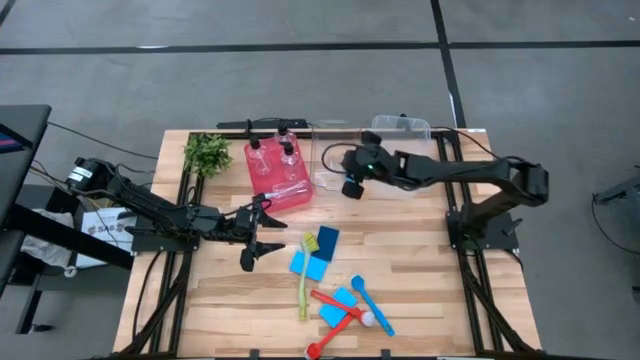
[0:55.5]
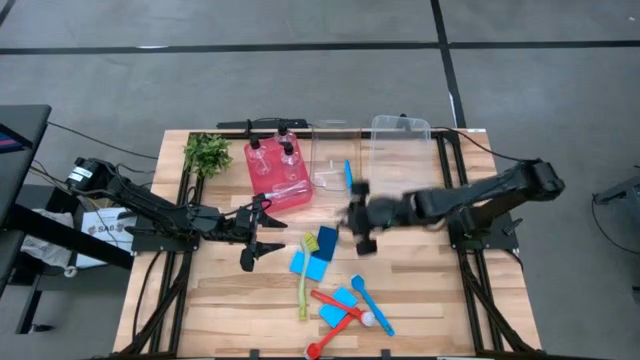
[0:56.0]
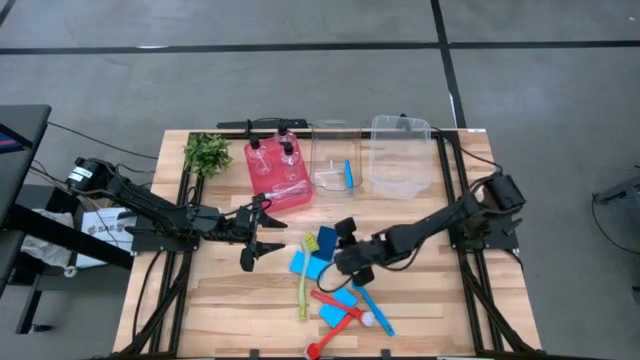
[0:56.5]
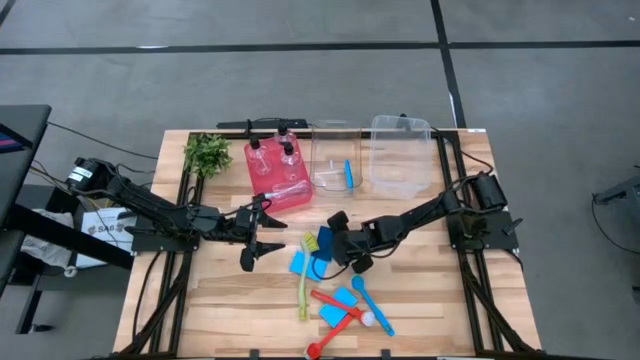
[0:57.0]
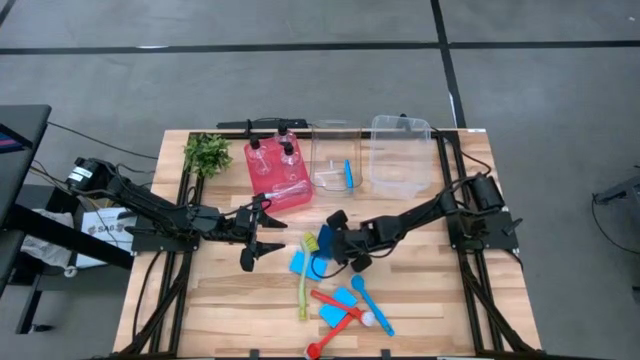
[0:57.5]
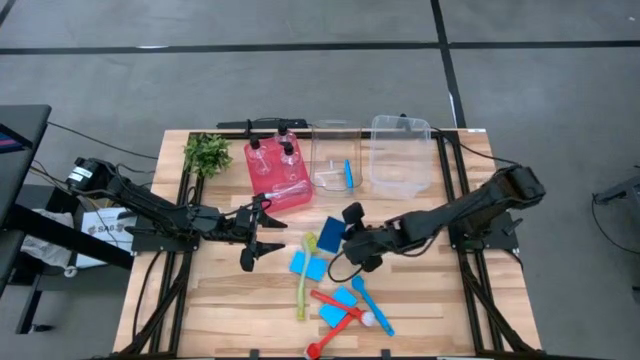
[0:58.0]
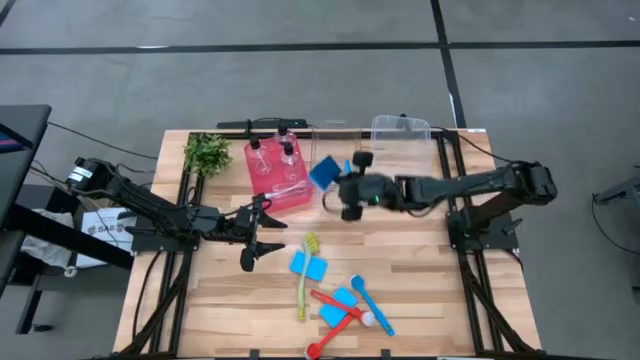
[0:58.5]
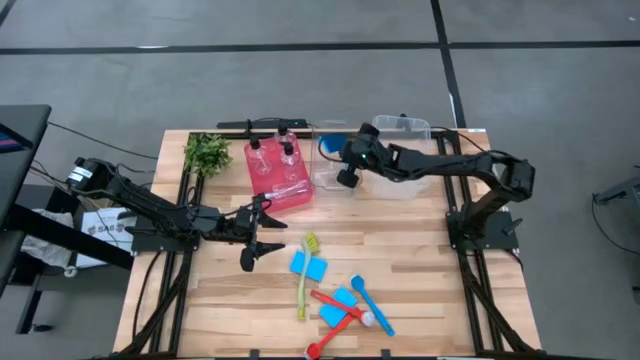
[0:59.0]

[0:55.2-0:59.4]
Task: Pick & Place Kitchen Sink Supplies
Put the blue sponge into the left transparent bin

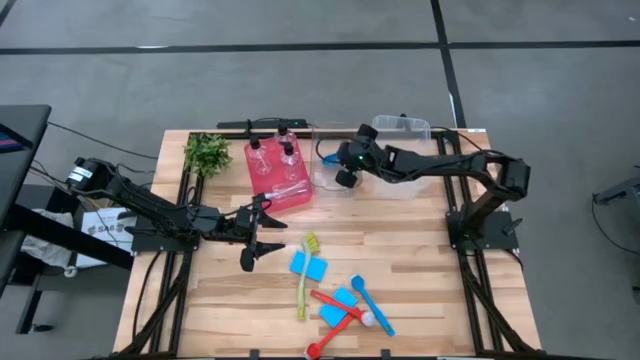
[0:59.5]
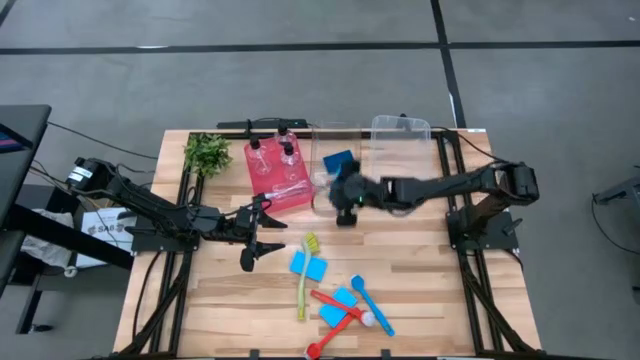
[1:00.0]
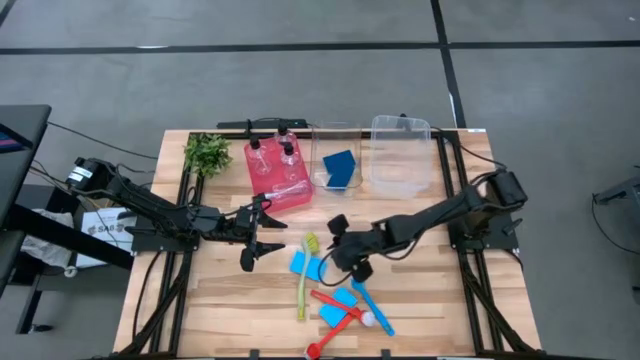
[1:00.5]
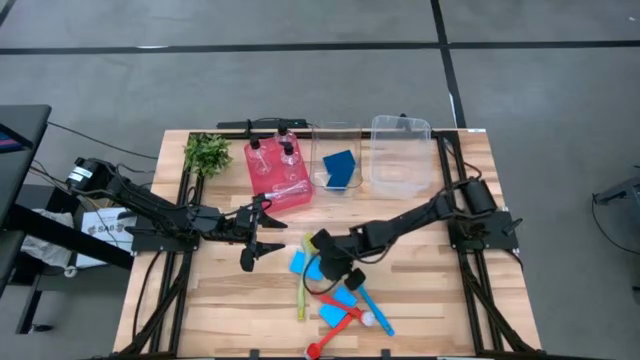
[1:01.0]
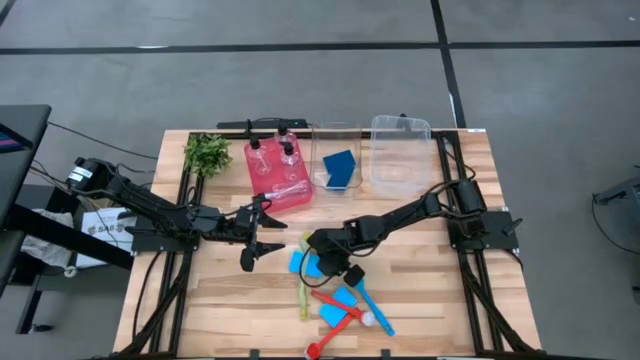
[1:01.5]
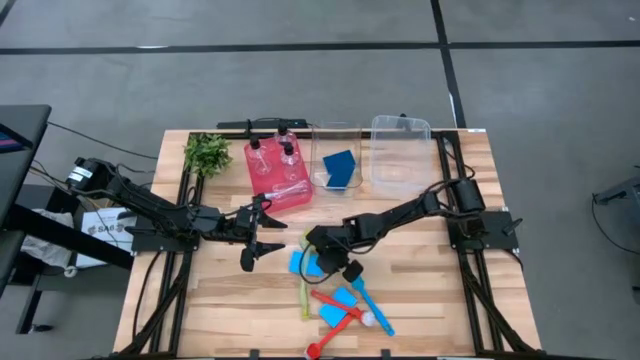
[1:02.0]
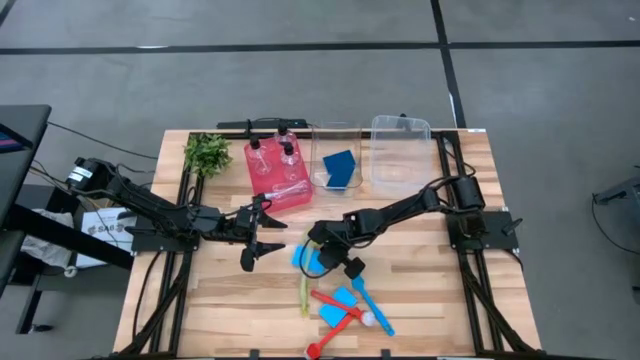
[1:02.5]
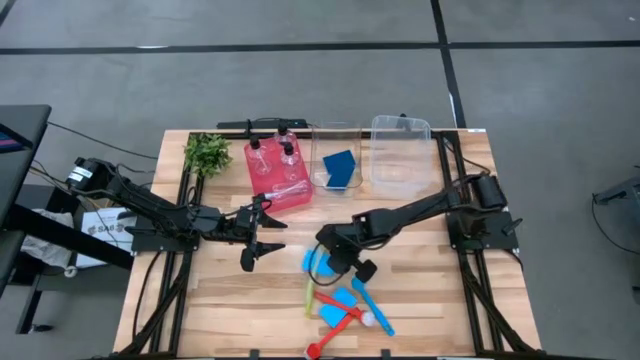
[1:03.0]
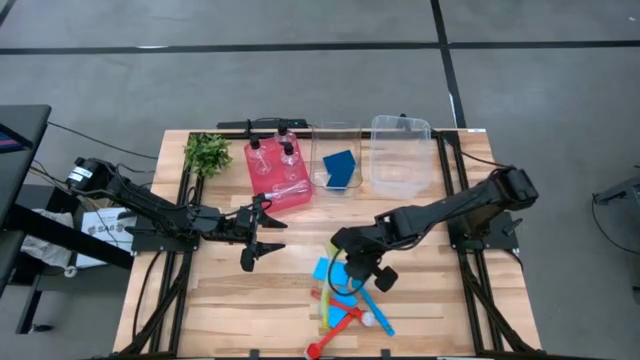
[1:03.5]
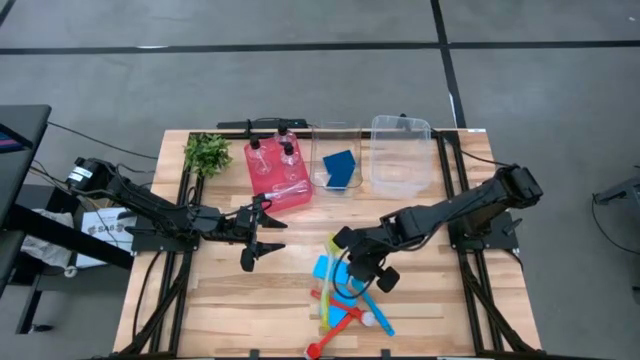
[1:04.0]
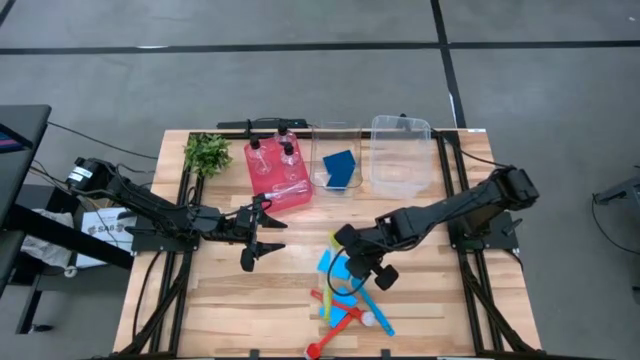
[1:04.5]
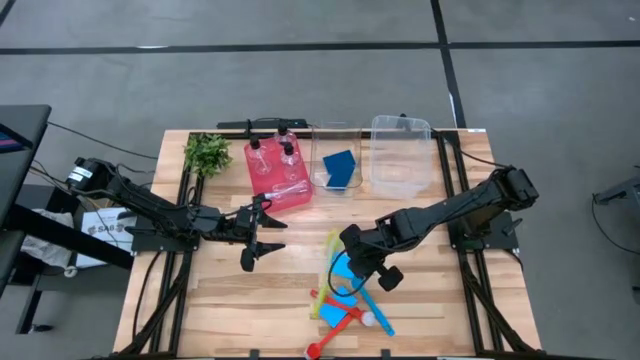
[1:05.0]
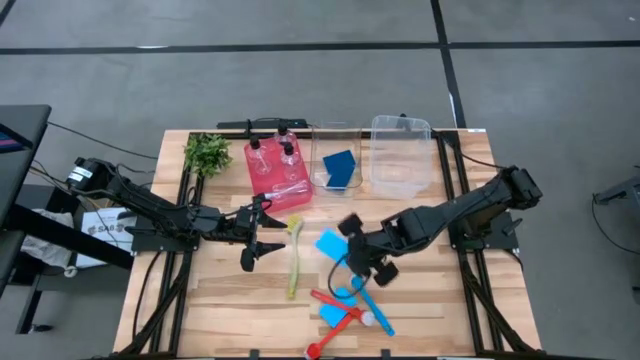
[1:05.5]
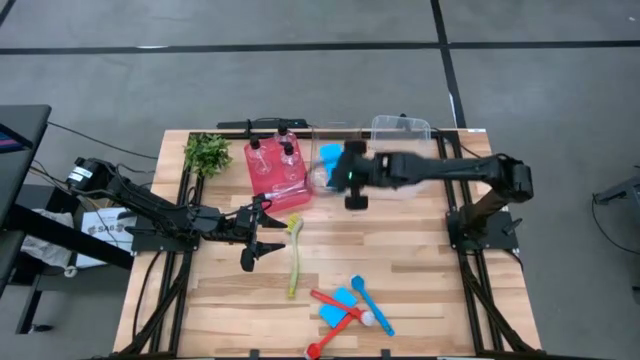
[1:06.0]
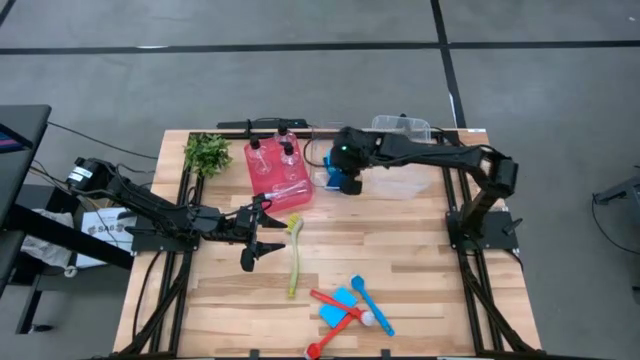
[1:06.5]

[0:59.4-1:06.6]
Put the blue sponge into the left transparent bin

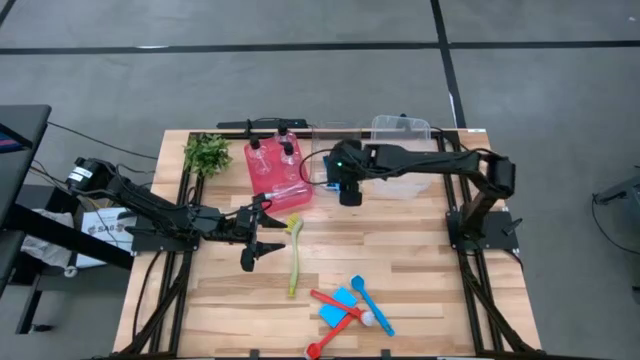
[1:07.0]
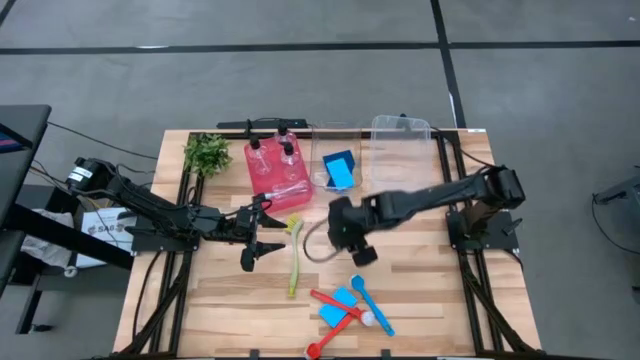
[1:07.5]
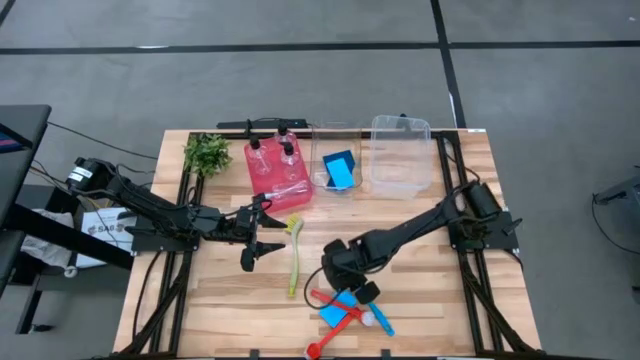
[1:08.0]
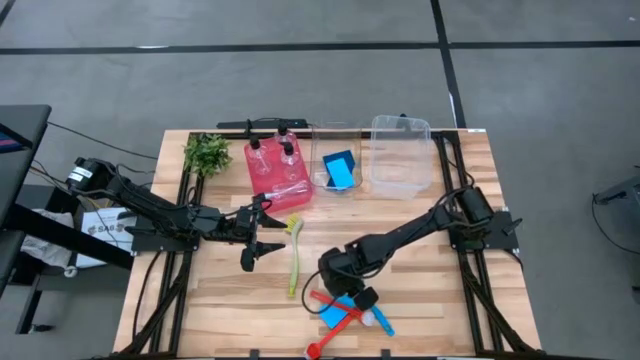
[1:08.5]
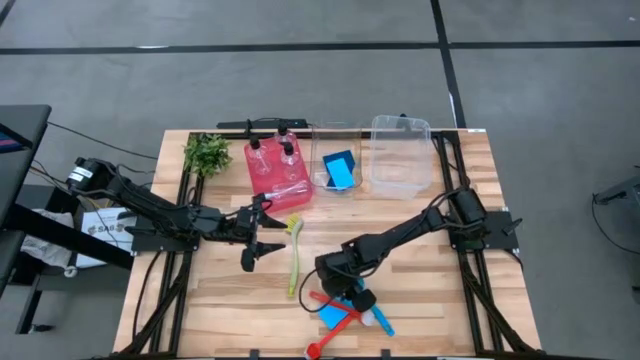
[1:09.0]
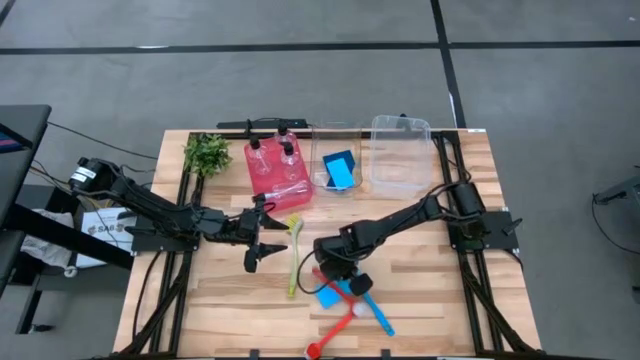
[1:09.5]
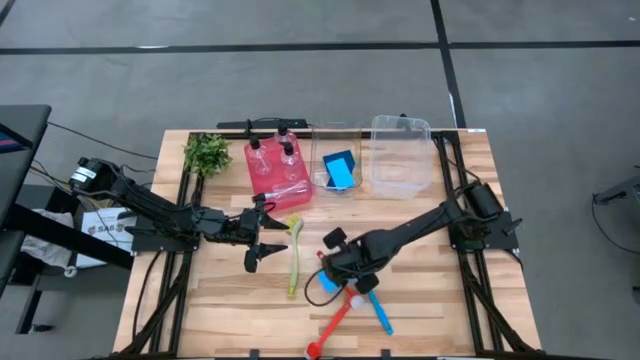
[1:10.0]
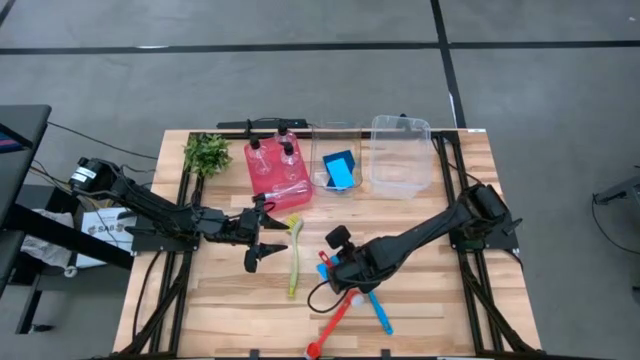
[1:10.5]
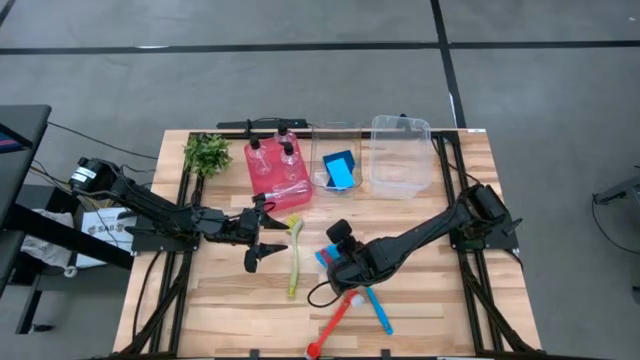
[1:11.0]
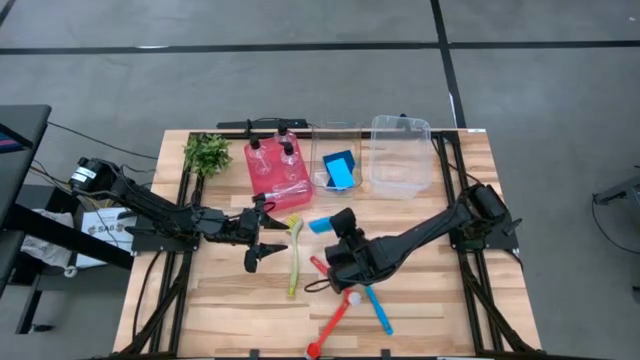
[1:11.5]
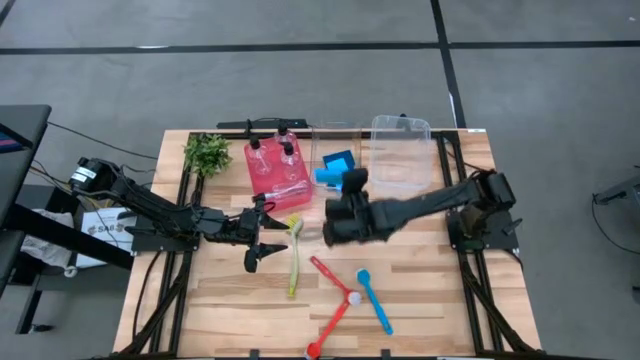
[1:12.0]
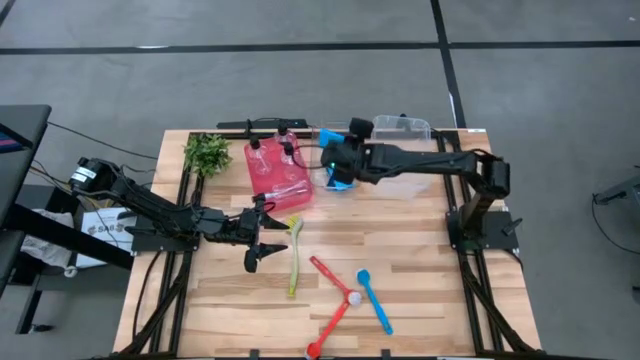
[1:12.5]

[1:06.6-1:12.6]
Put the blue sponge into the left transparent bin

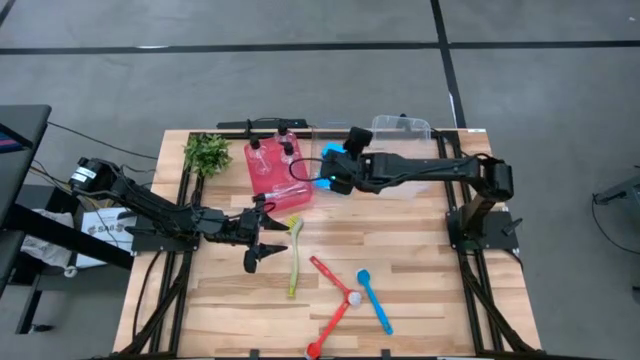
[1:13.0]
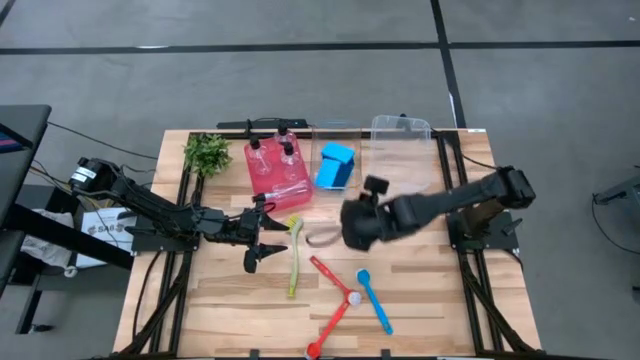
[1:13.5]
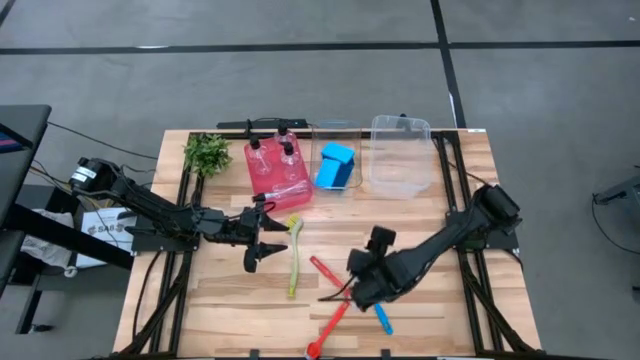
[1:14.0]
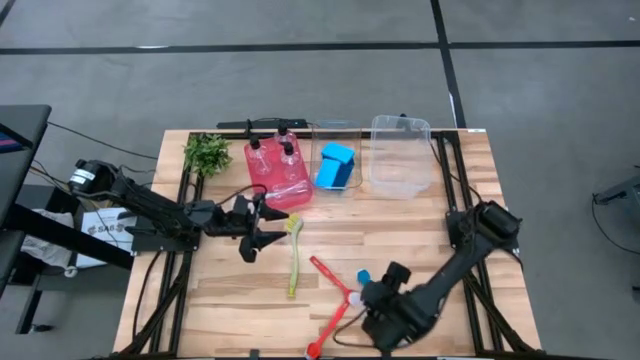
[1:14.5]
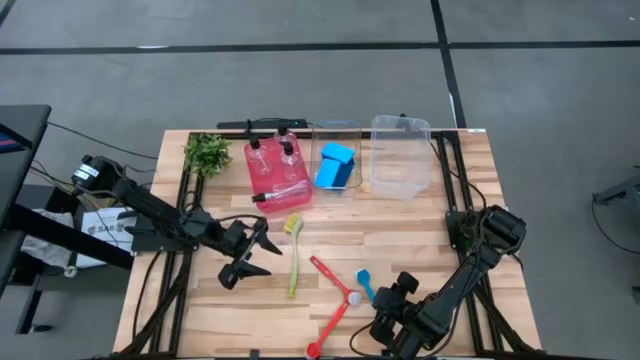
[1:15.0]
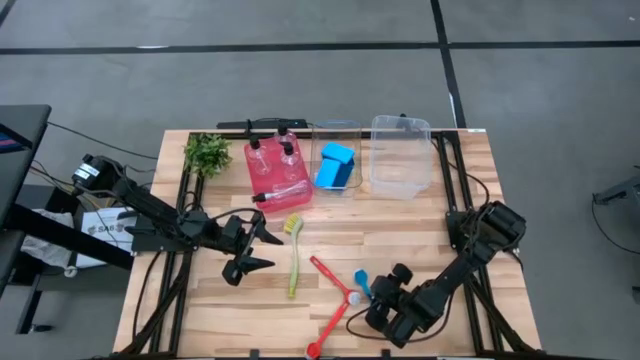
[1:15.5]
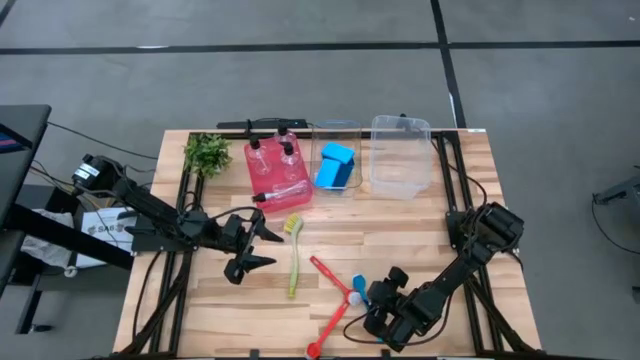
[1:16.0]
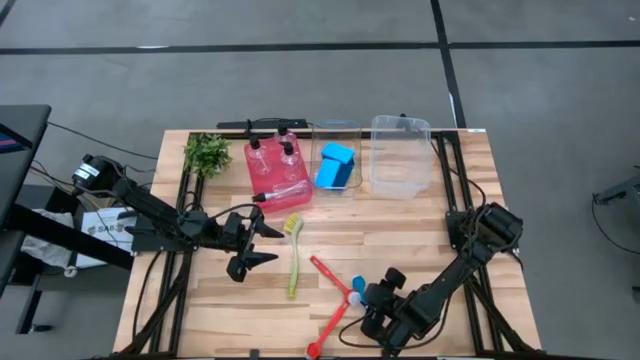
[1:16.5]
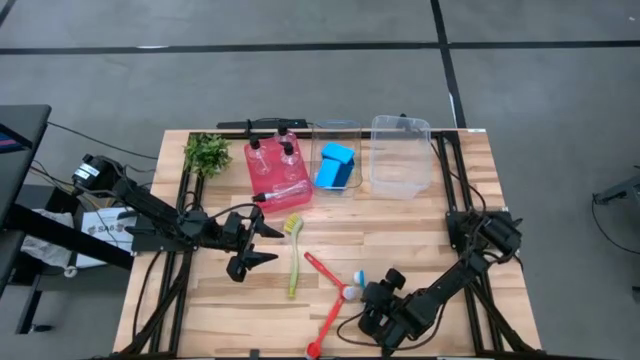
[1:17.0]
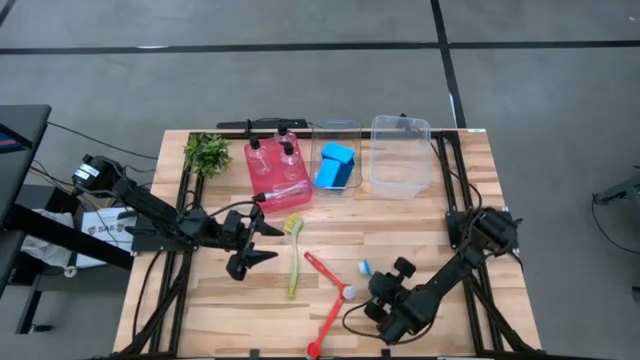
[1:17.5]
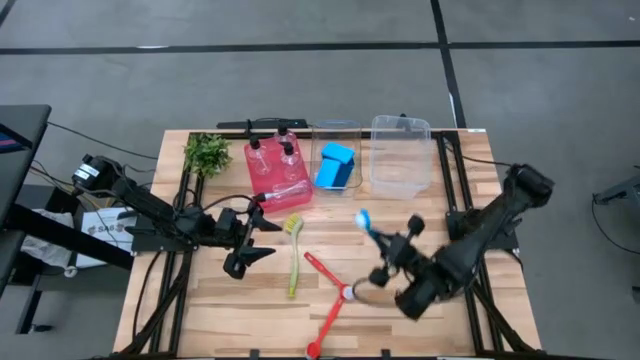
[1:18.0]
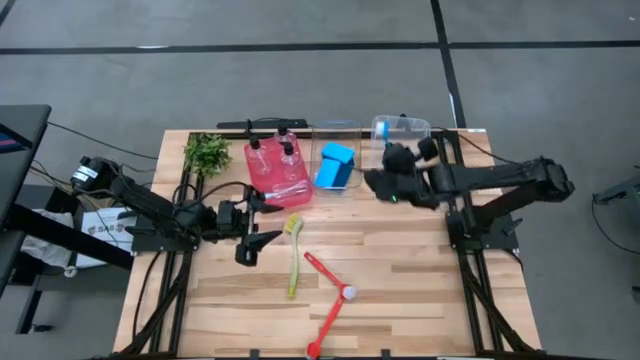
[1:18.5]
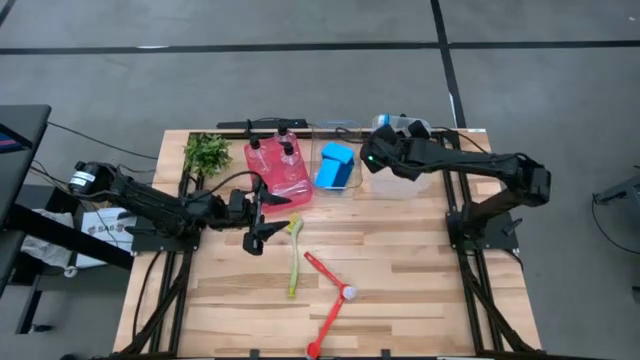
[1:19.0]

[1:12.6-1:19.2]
Put the blue dish brush into the right transparent bin
